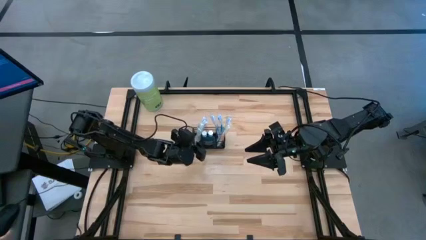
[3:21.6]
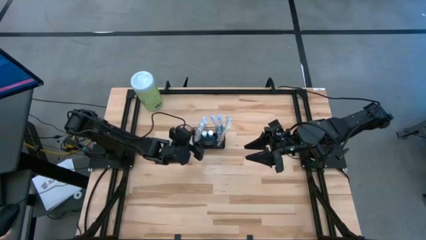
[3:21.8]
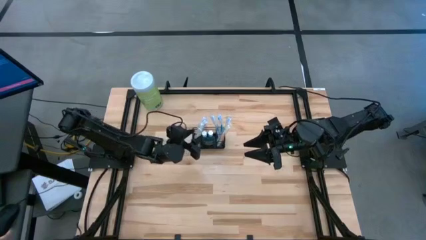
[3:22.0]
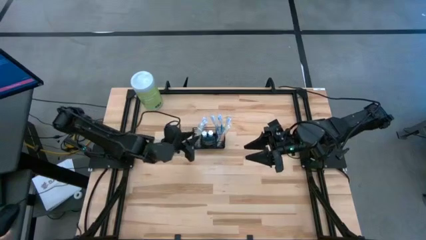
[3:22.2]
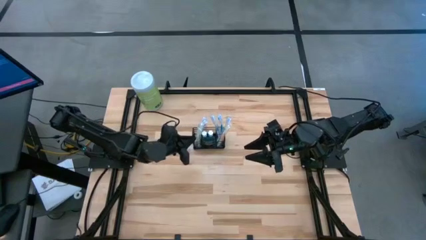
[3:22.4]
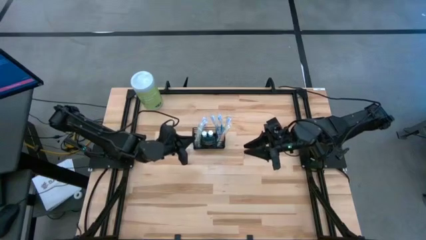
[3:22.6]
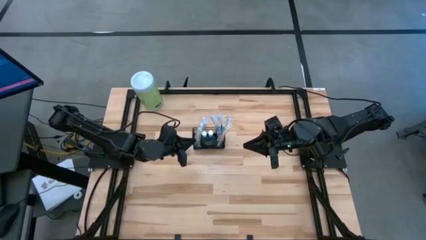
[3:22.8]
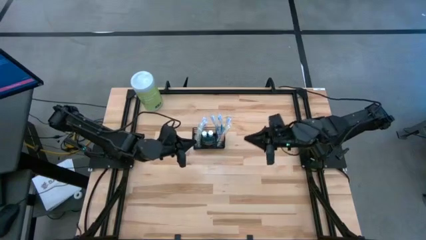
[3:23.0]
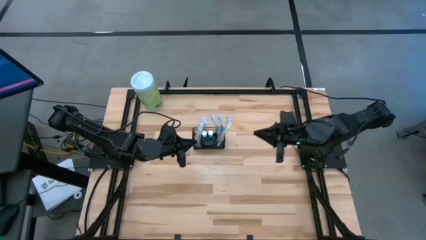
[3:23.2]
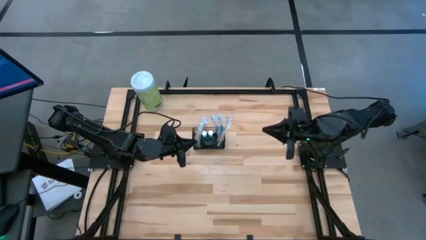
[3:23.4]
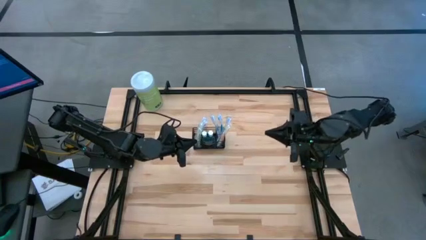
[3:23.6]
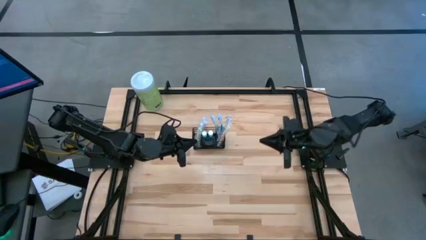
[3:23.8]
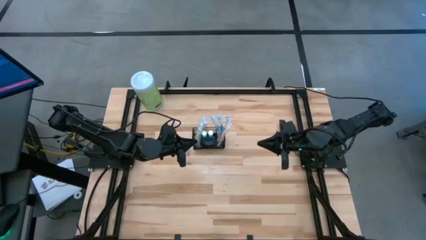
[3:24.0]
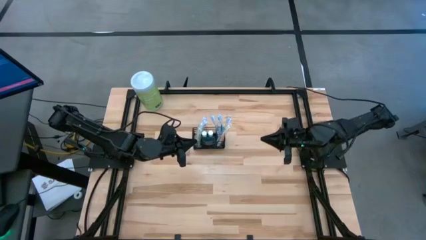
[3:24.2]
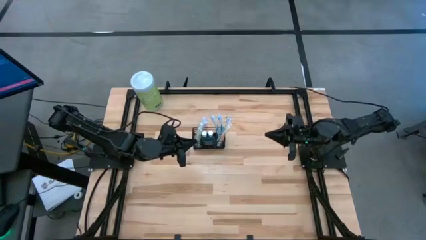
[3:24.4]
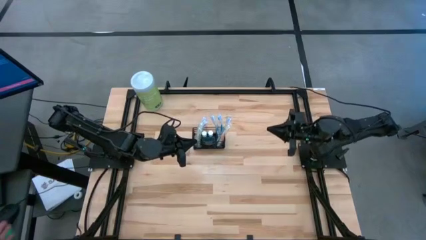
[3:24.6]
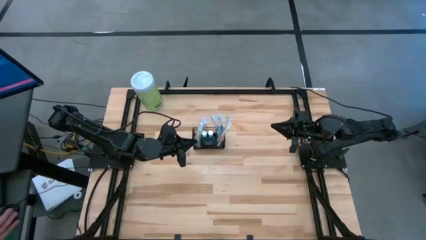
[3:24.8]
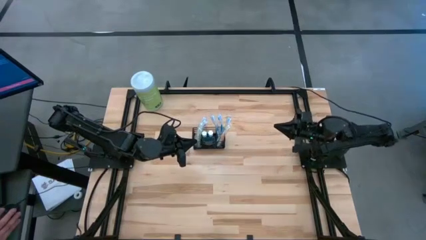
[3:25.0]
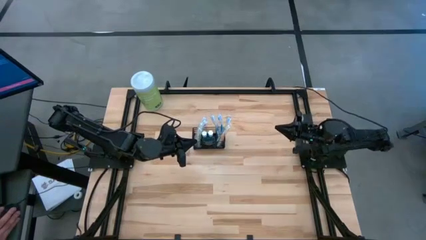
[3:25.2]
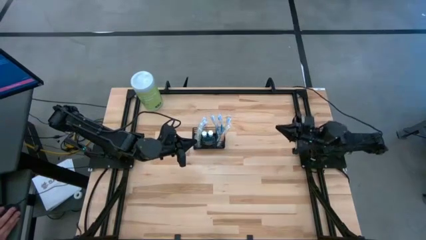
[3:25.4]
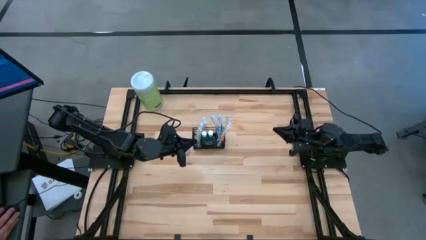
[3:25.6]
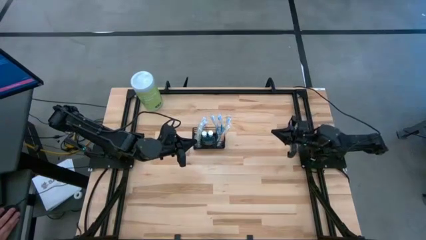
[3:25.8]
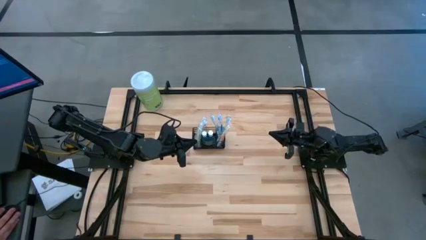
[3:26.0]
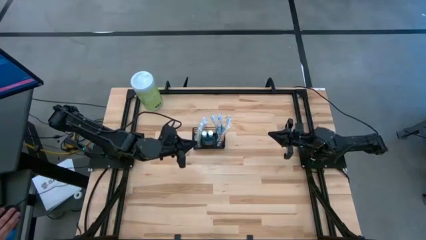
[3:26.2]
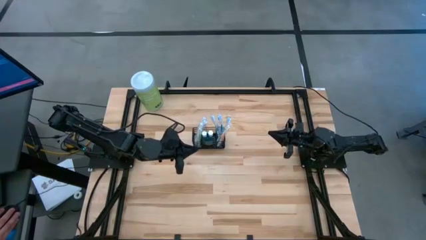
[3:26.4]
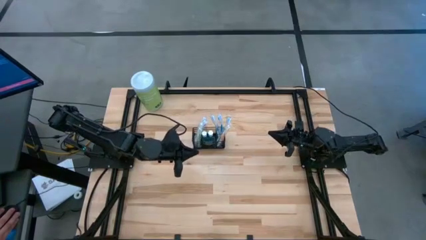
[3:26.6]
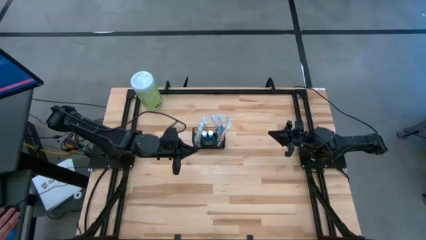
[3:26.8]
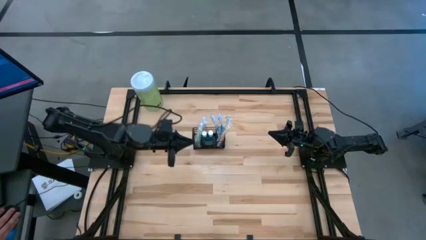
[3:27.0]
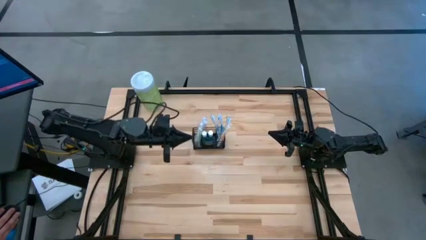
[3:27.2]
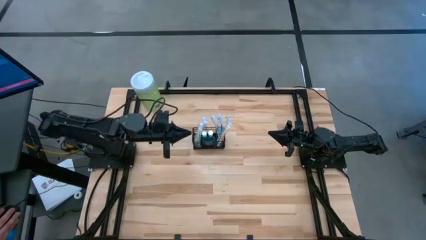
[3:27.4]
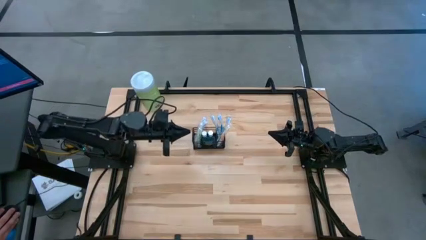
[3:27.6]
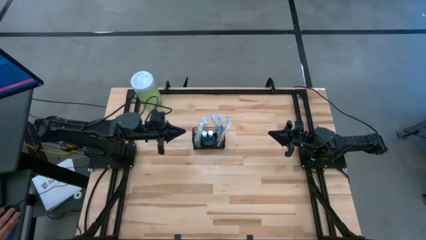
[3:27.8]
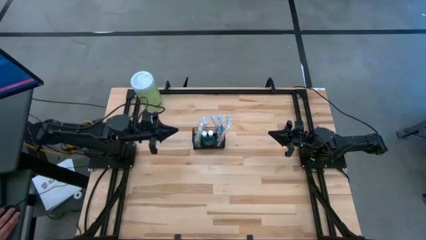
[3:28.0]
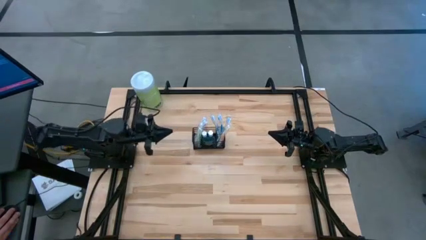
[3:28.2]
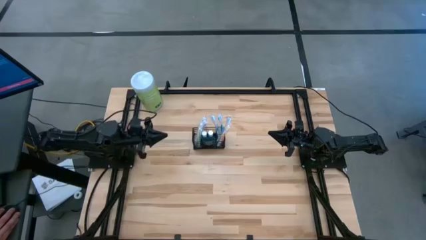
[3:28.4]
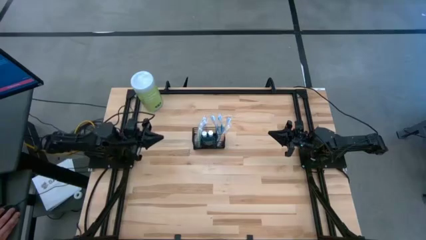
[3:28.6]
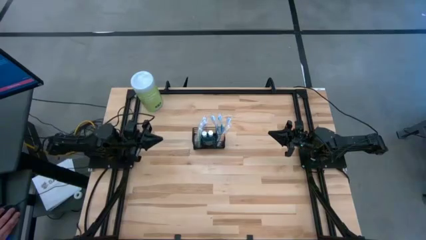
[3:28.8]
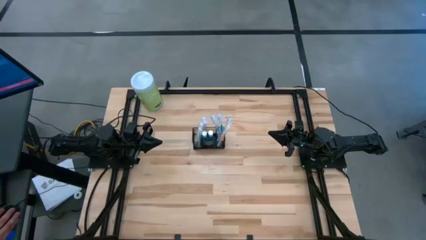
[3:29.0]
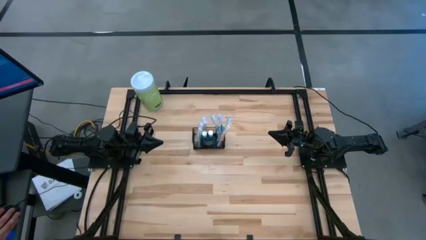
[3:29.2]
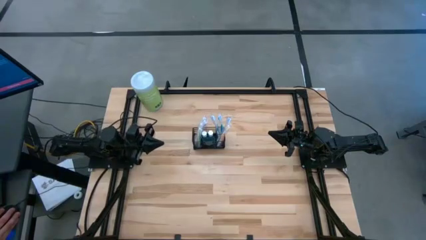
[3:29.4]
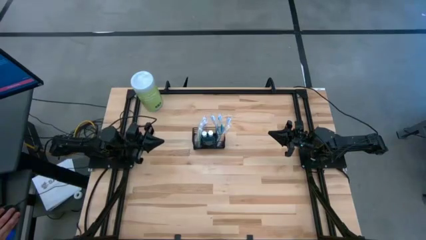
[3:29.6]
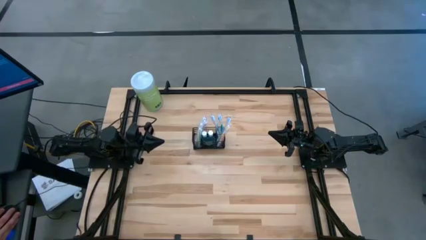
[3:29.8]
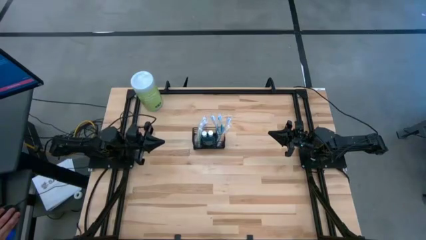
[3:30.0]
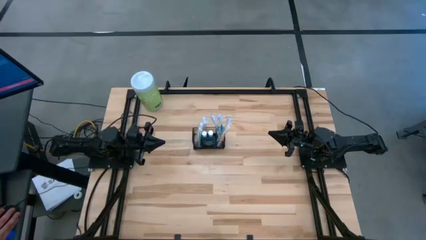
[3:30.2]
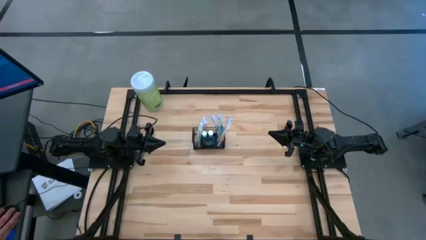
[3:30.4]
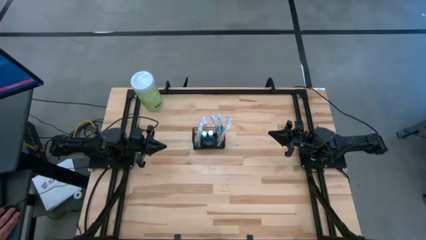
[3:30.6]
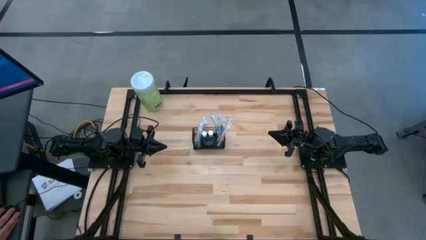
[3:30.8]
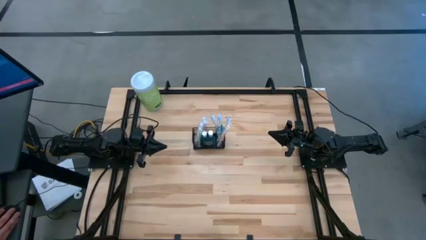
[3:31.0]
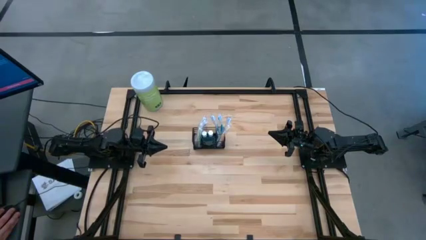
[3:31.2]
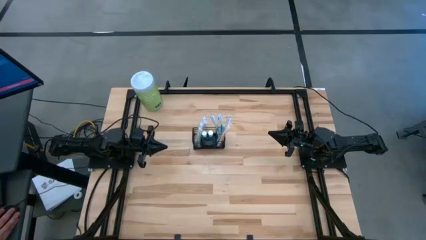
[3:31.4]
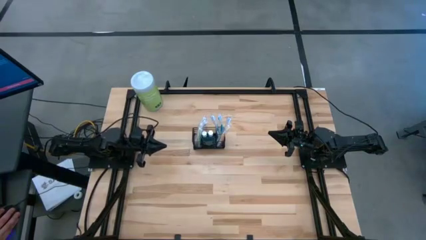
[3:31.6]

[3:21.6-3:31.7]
Task: Pick & Place toothbrushing station
Return to Home Position

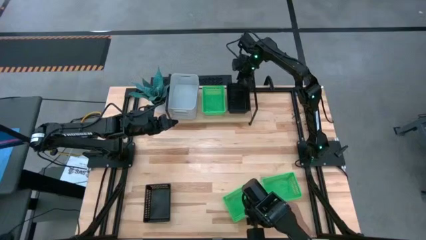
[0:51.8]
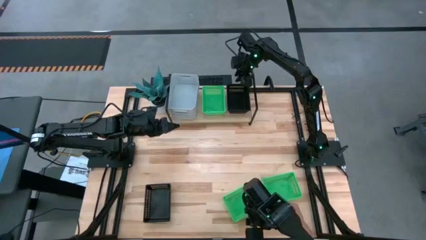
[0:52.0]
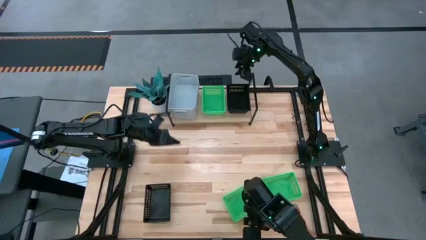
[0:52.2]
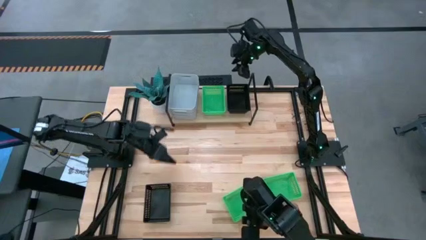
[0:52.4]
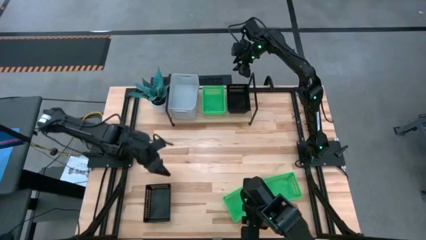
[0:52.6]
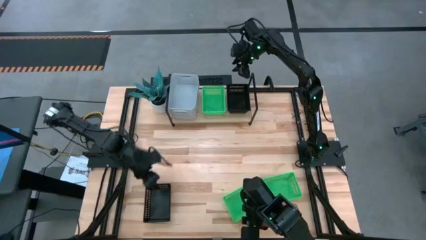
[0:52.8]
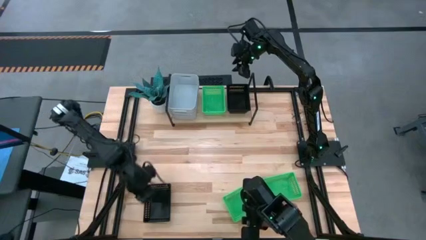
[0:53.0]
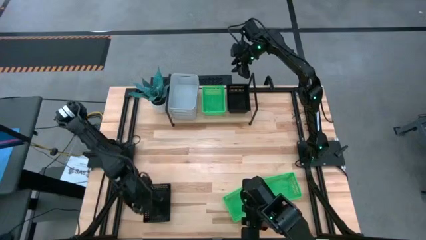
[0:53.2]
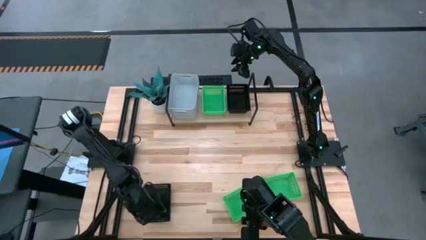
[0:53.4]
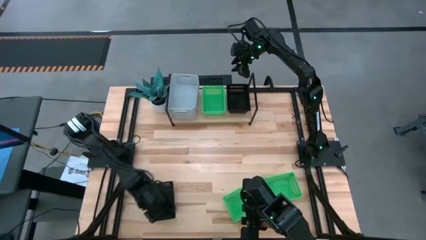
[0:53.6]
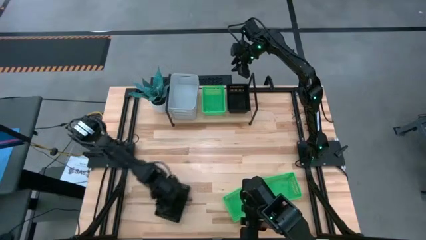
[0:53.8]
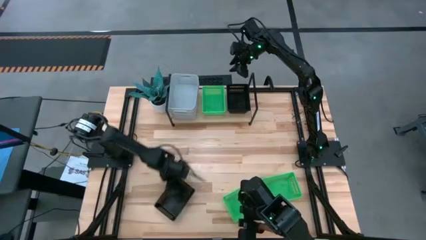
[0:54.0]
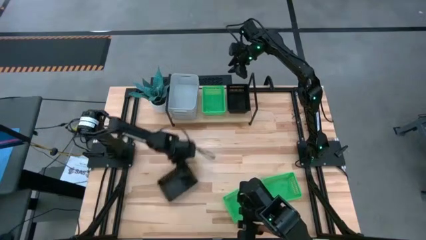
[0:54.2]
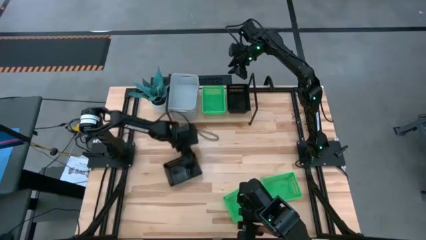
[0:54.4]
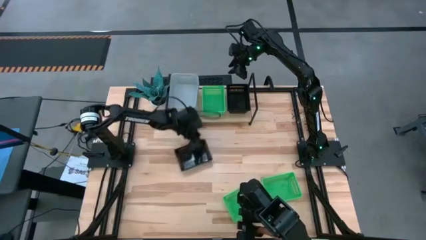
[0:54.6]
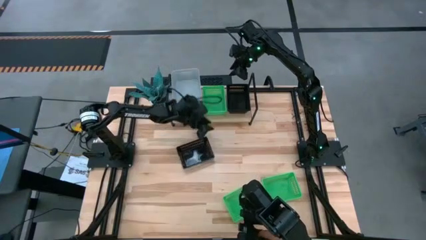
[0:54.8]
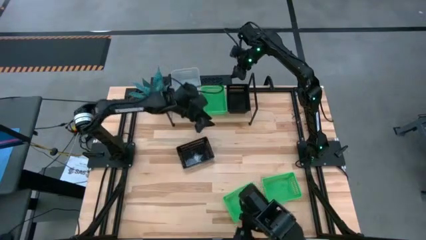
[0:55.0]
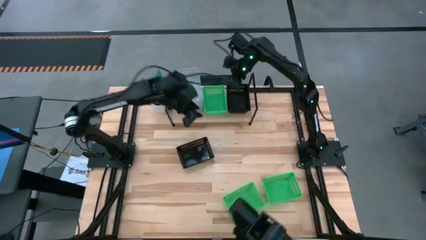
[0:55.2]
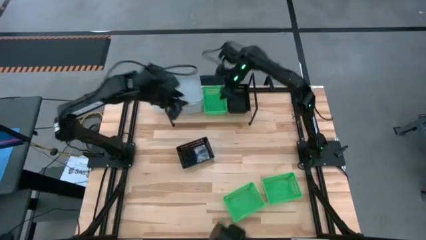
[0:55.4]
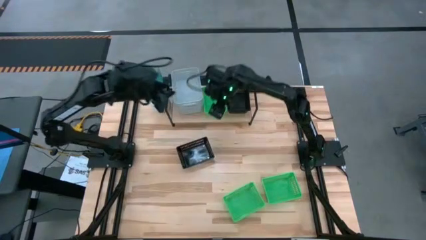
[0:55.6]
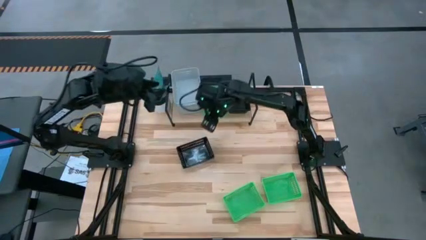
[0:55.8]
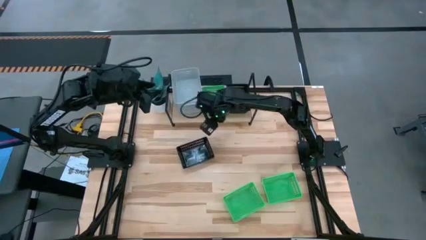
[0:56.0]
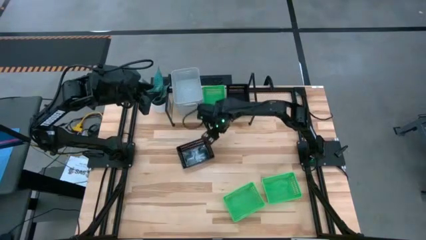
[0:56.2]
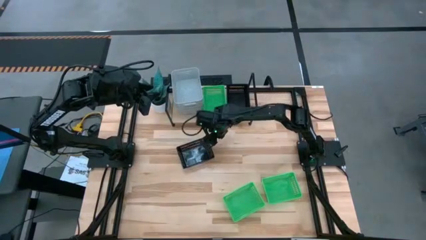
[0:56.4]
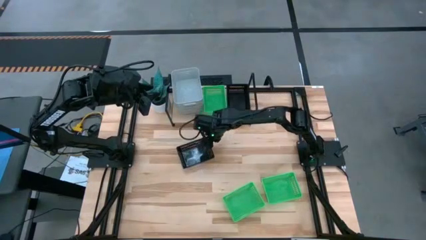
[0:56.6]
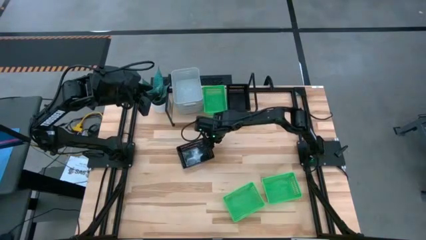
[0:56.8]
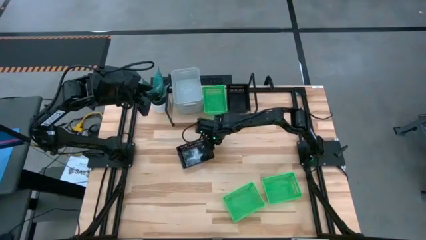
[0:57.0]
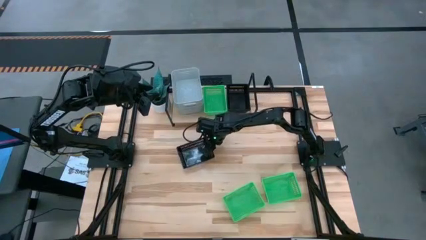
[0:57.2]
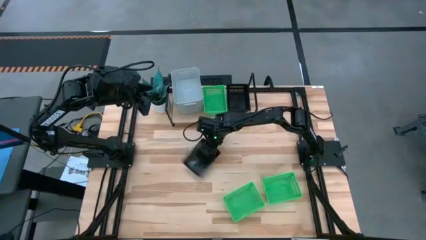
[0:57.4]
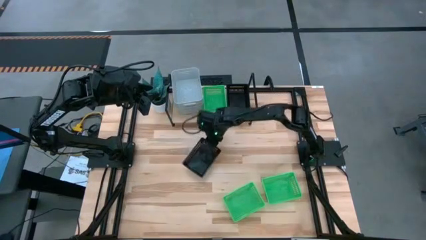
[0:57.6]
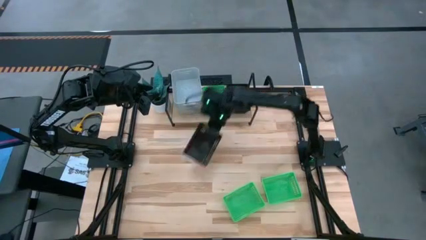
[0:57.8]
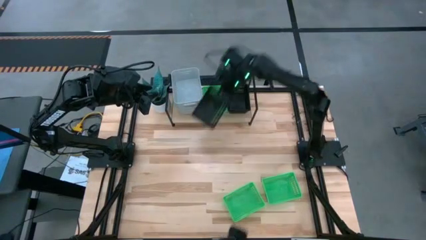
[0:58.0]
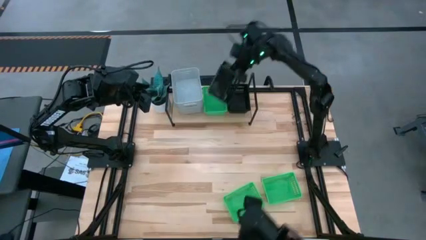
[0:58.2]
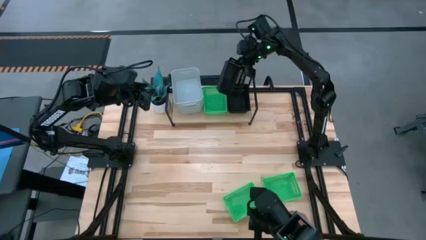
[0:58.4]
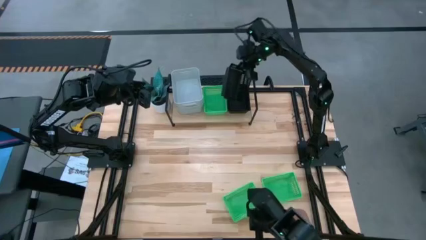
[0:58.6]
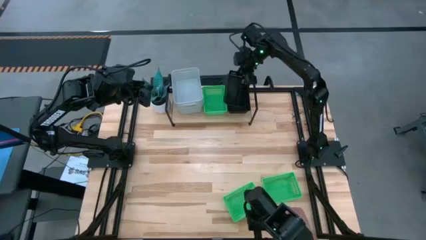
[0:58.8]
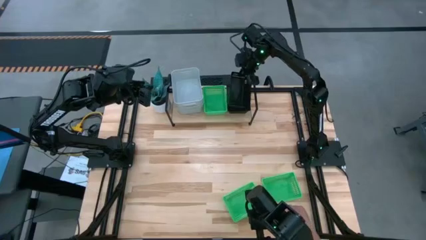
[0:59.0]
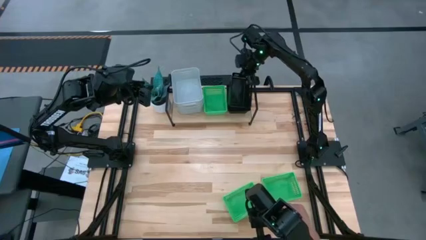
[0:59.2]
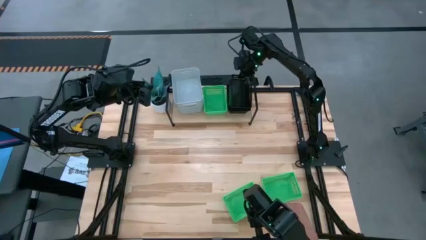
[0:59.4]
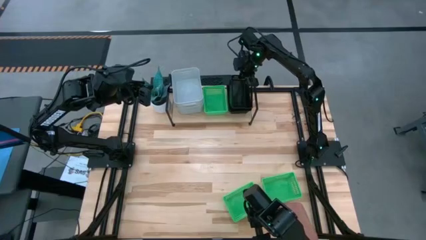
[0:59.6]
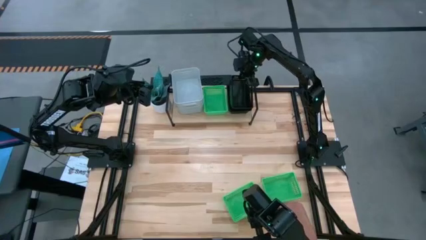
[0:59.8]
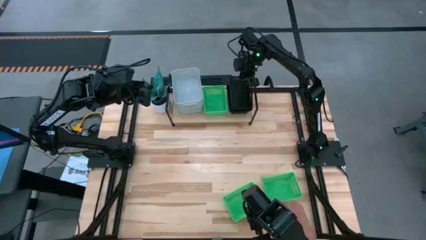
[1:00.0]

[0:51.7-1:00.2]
Task: Stack baskets on shelf by color
Stack the black bin on the black bin on the shelf
